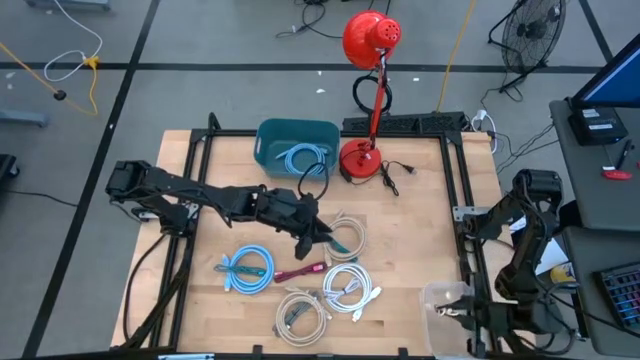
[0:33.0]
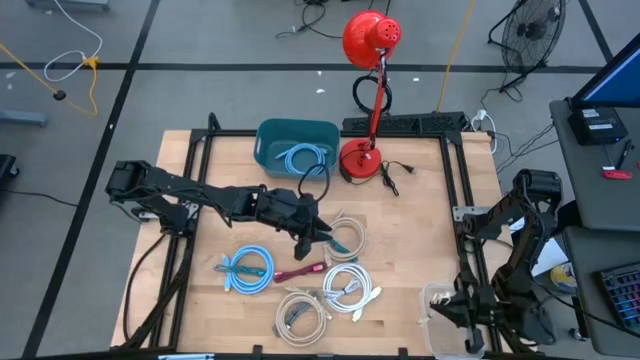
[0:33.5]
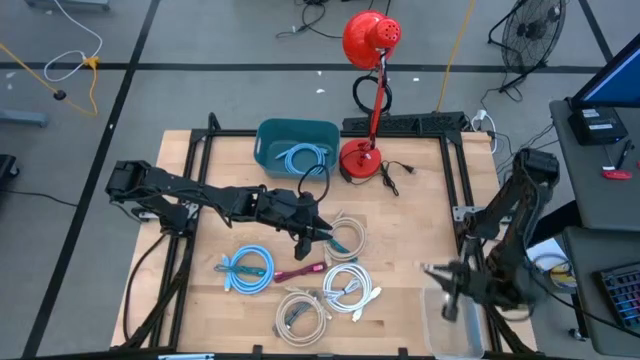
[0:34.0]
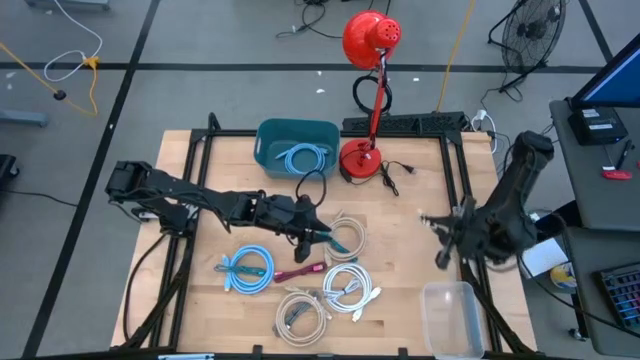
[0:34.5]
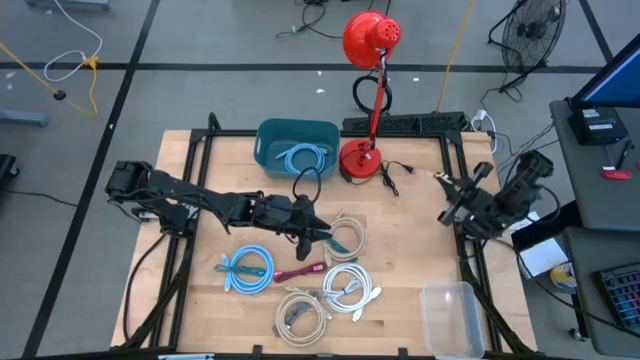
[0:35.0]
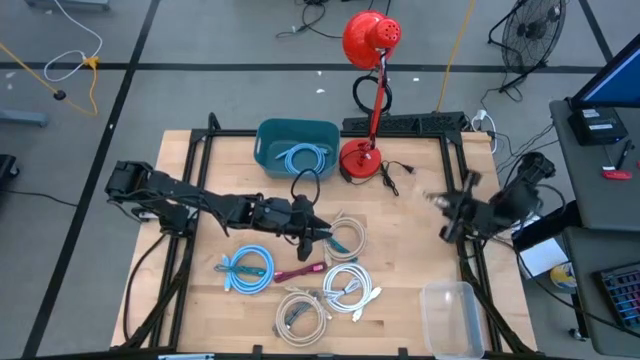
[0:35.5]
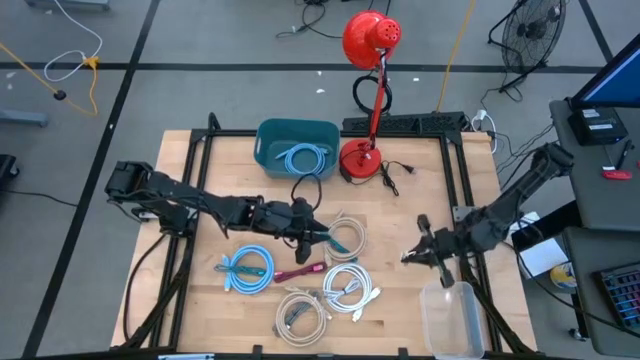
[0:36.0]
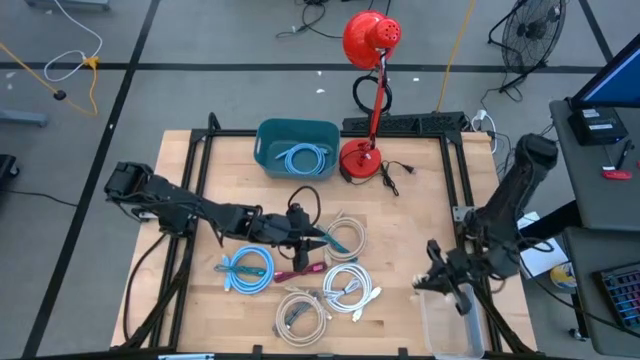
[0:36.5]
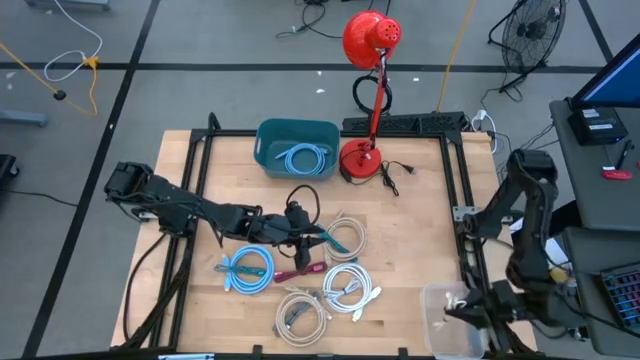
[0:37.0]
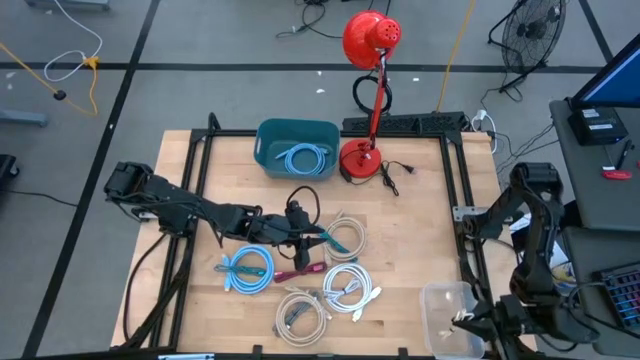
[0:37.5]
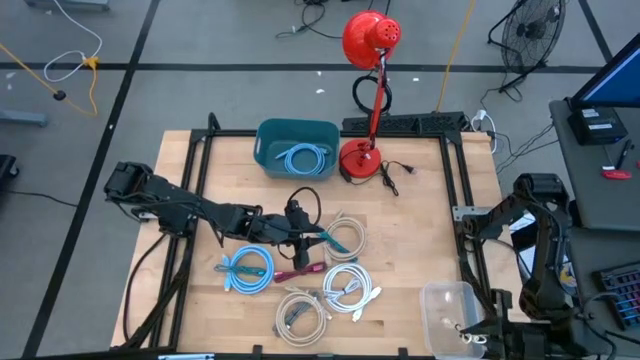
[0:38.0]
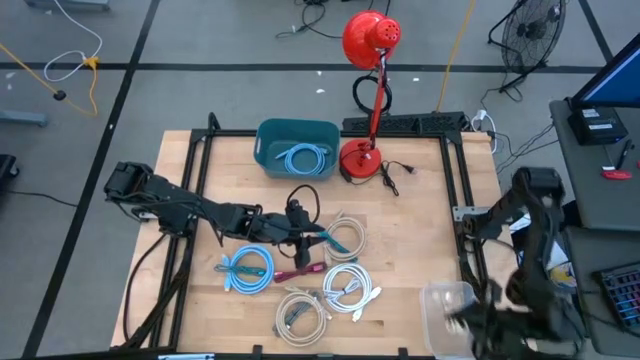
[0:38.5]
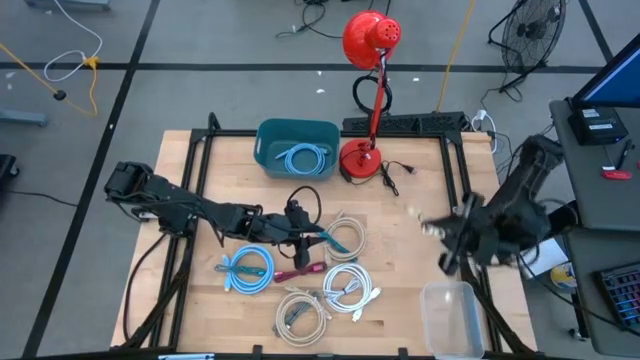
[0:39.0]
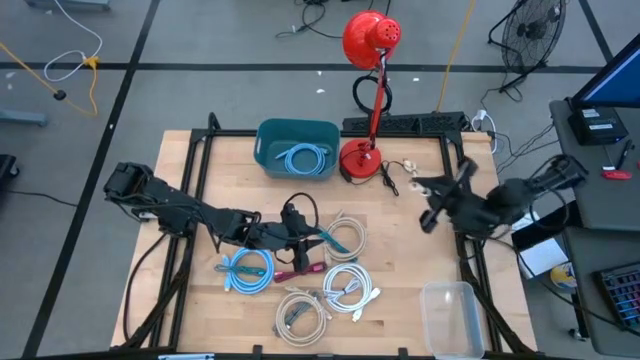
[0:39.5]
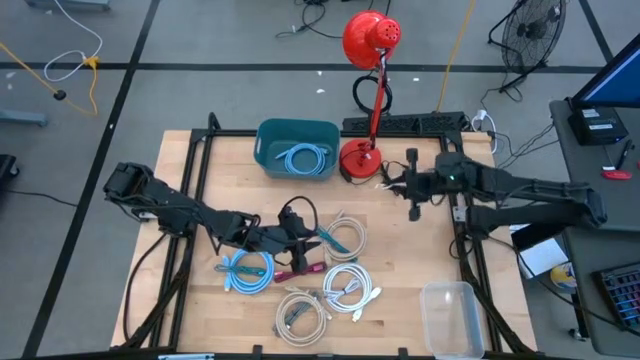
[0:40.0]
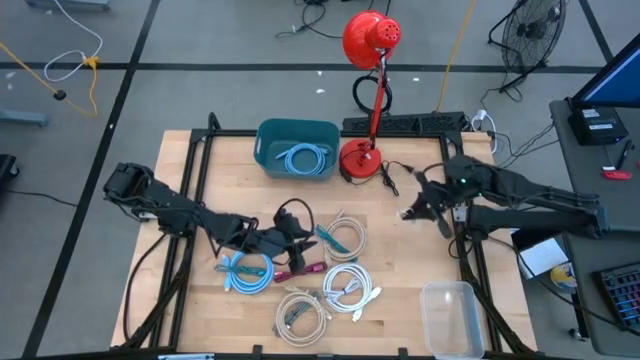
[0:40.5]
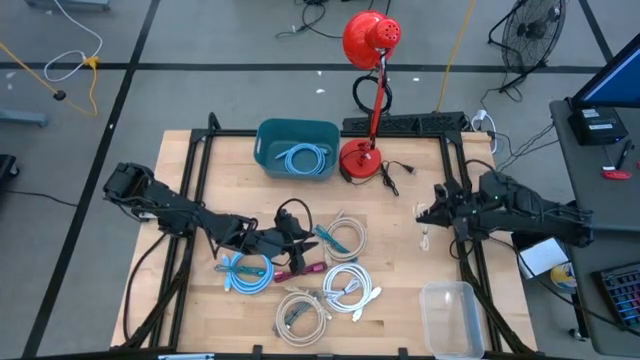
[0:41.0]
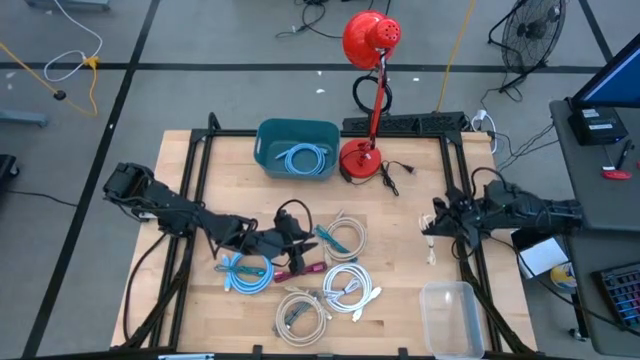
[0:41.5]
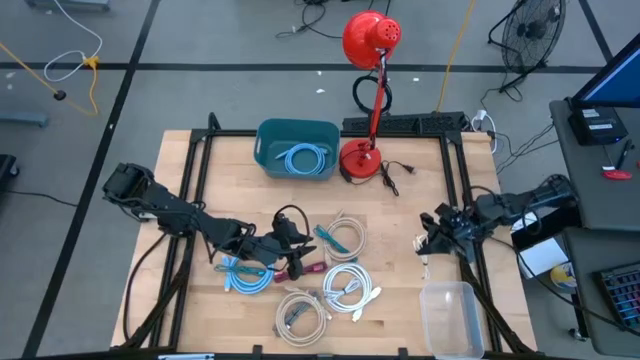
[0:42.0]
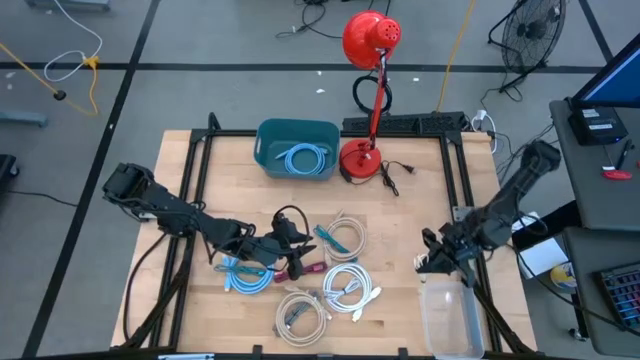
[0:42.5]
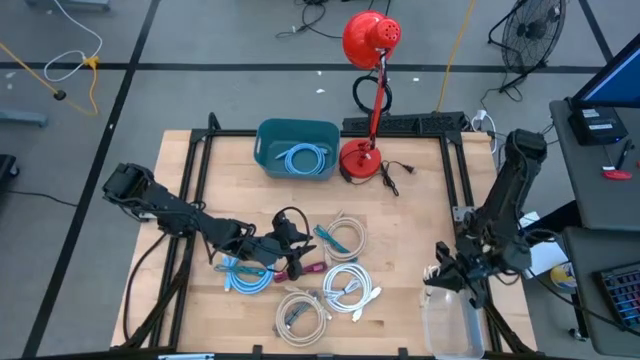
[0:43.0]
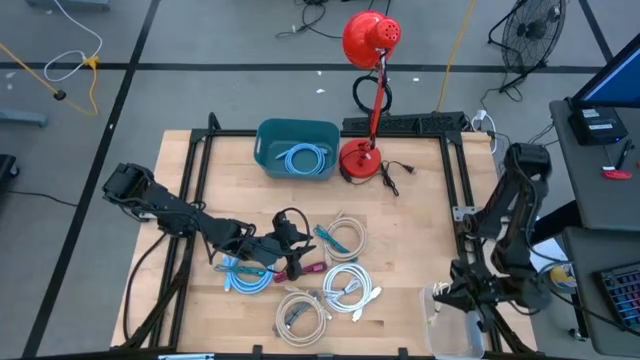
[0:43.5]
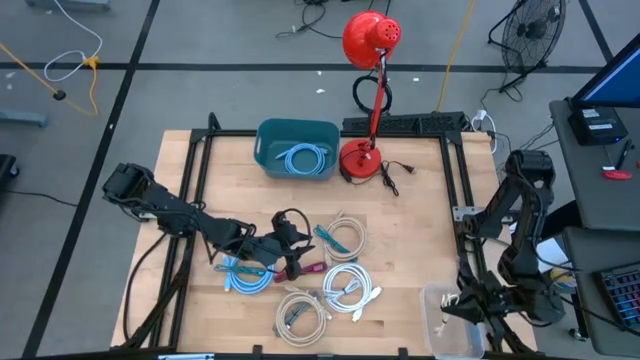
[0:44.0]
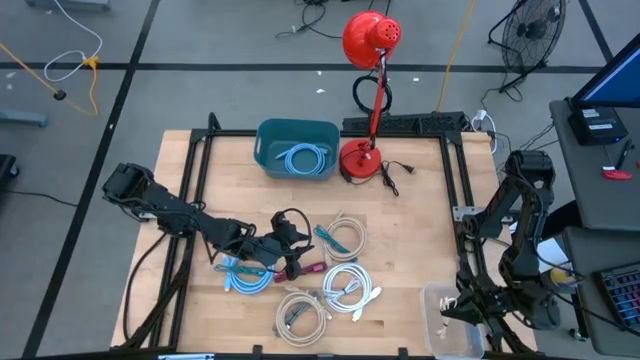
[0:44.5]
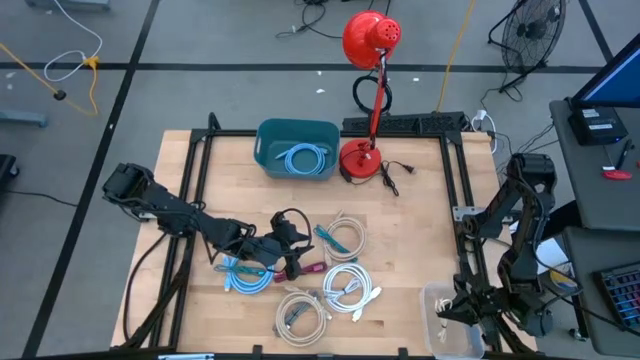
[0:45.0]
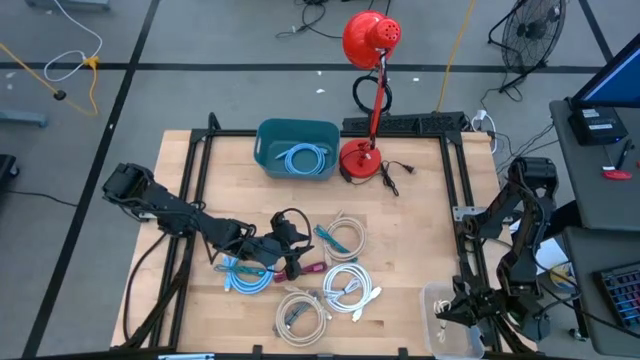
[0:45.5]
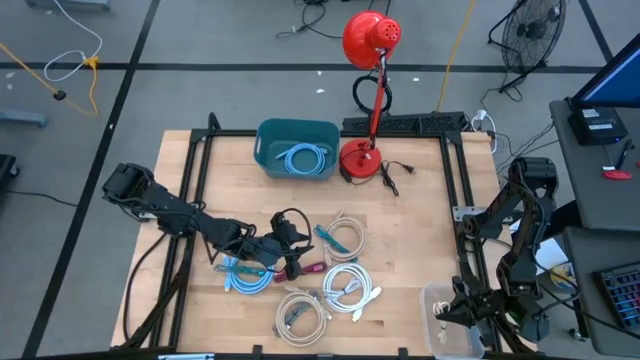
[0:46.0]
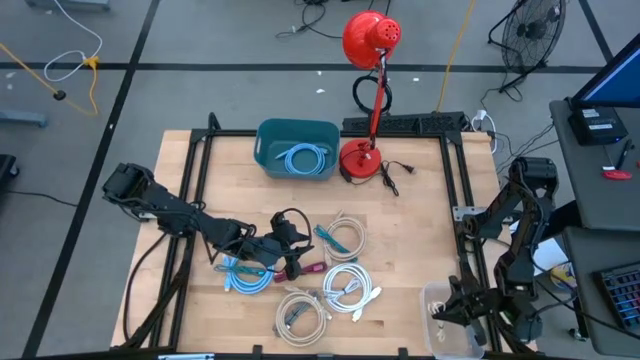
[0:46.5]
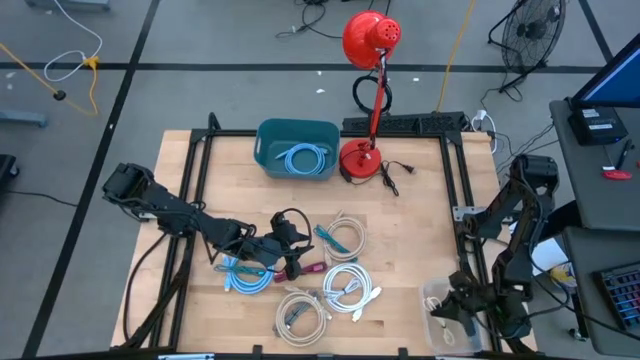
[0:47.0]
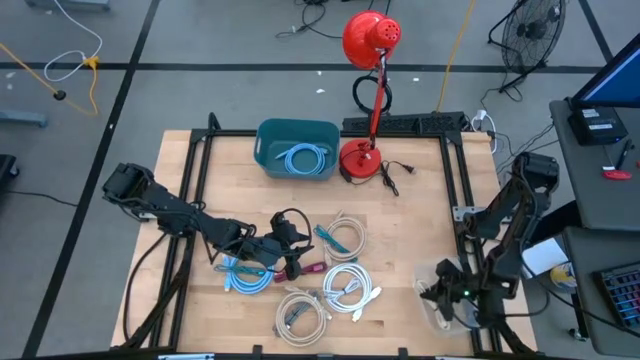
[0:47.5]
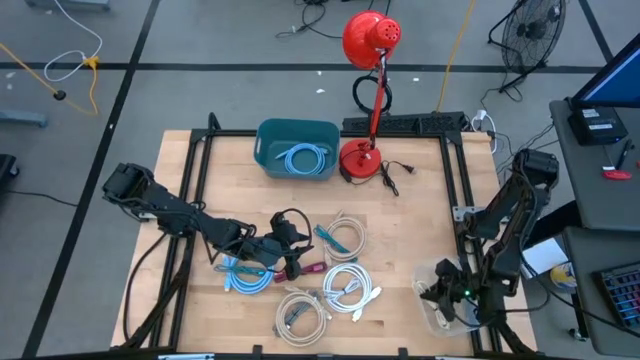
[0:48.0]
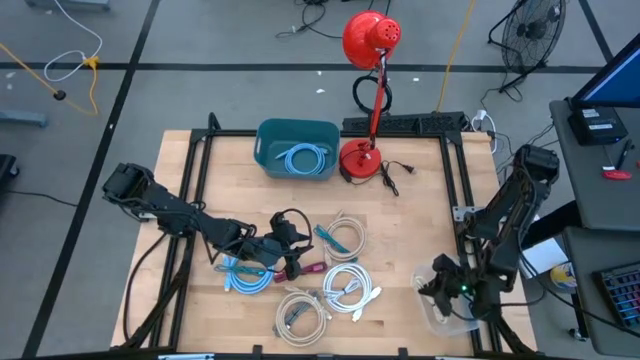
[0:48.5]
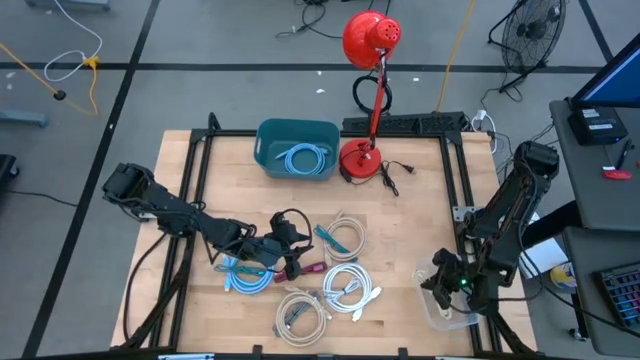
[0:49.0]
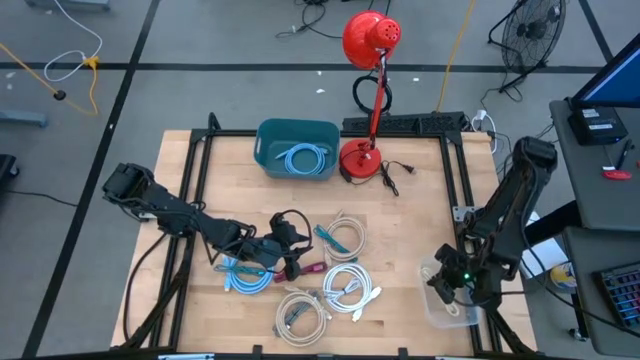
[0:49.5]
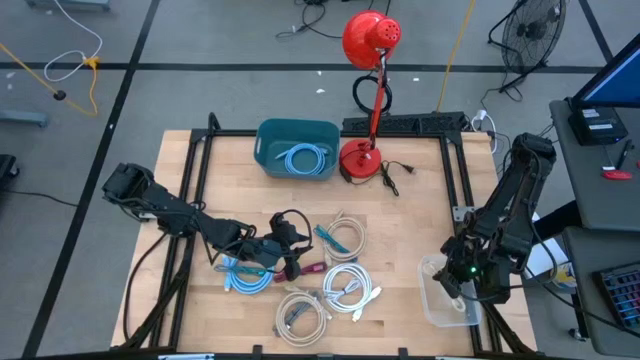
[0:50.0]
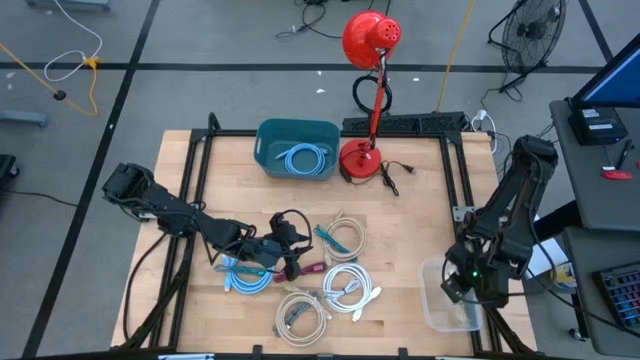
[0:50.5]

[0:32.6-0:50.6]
Task: Pick & Place USB Port
Put the light brown charger cable into the transparent bin

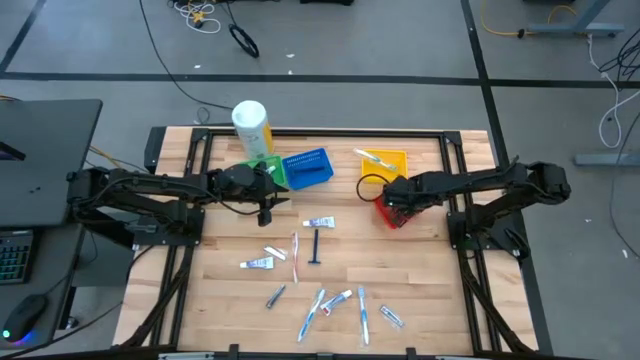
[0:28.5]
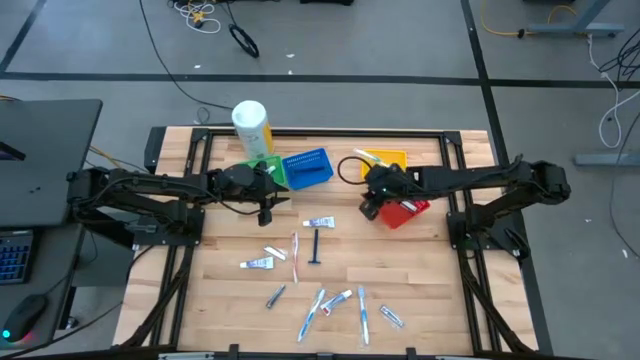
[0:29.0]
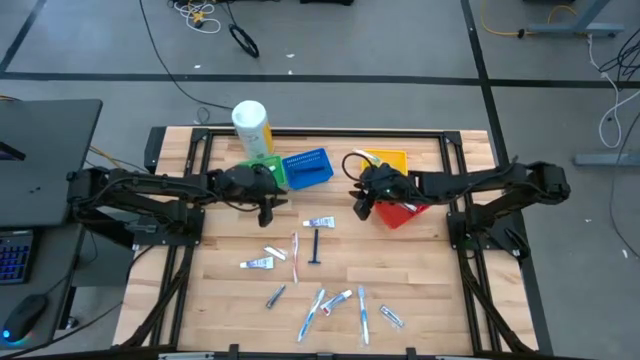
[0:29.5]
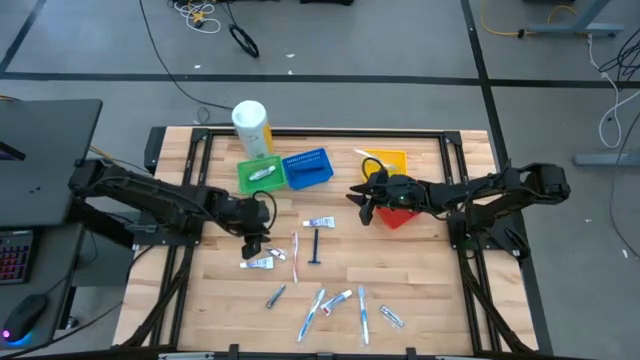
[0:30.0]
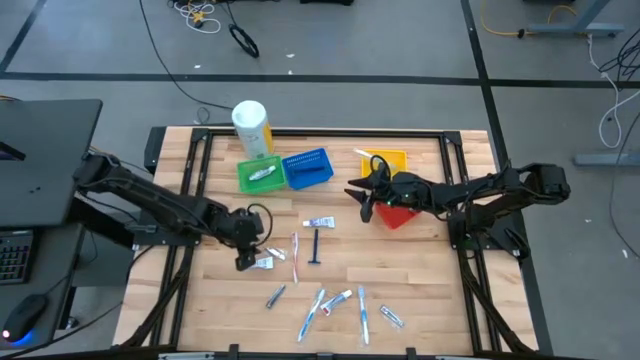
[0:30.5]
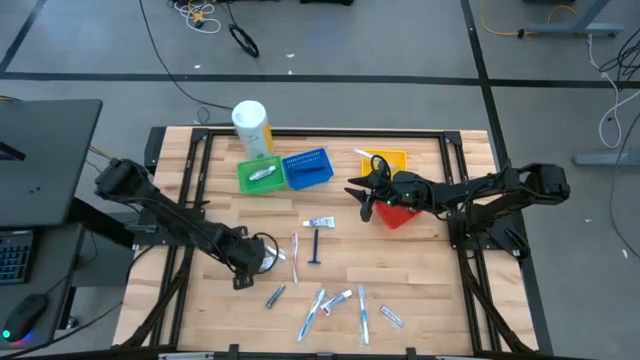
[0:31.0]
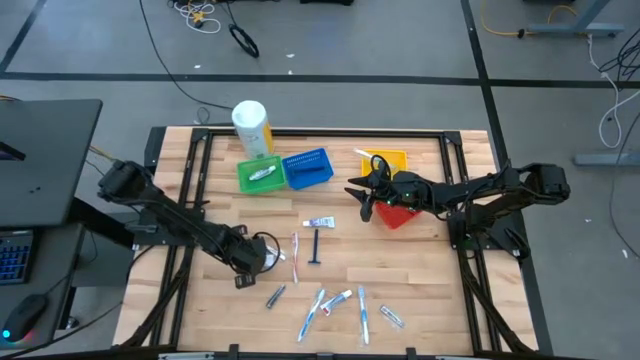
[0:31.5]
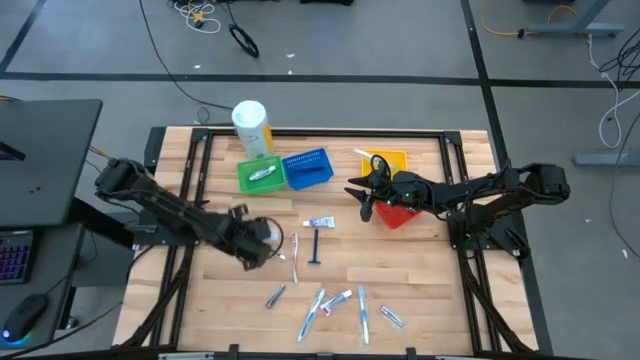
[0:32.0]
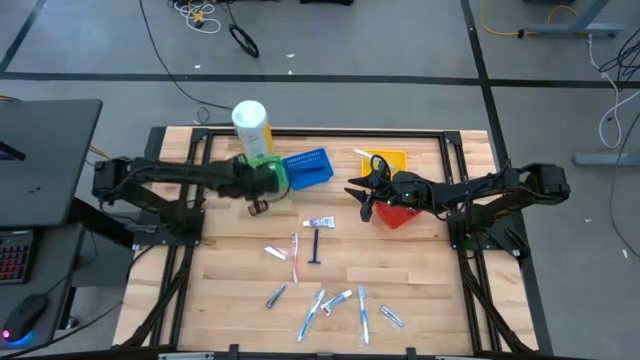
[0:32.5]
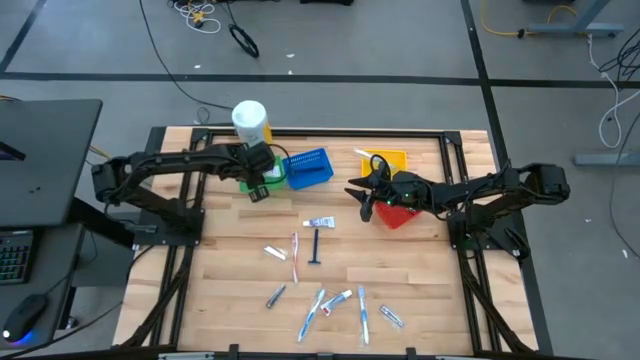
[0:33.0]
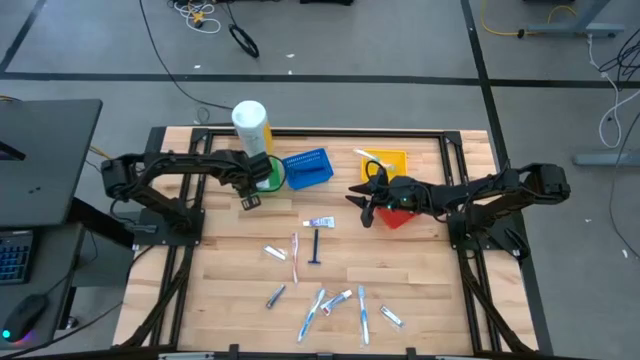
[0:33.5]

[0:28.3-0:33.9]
Task: Pick & Place Travel size toiletries
Put the white toothpaste into the green bin
